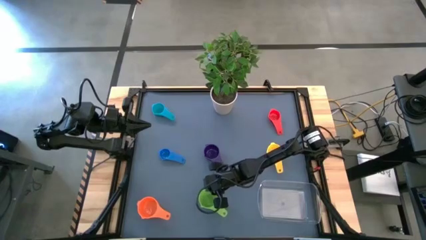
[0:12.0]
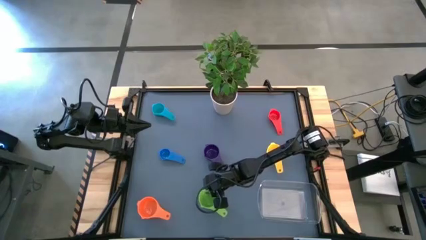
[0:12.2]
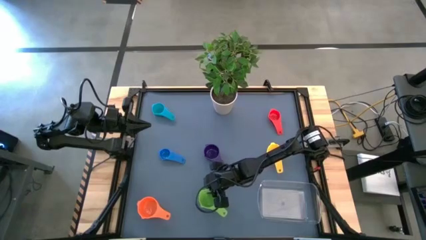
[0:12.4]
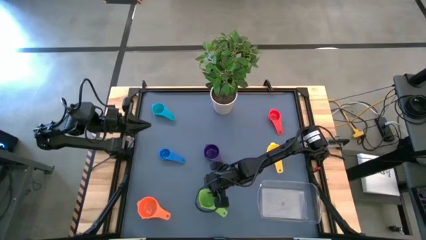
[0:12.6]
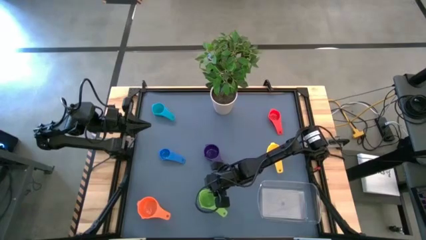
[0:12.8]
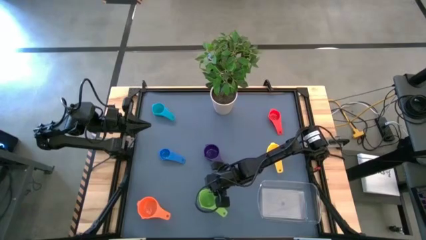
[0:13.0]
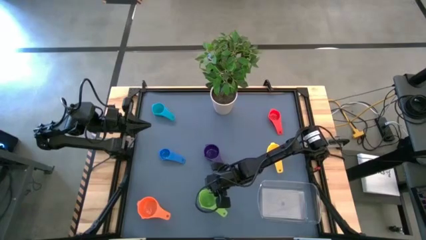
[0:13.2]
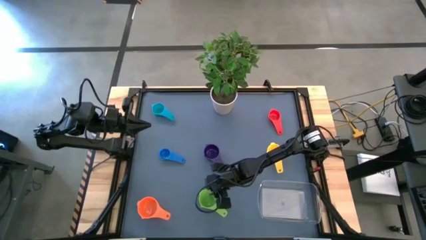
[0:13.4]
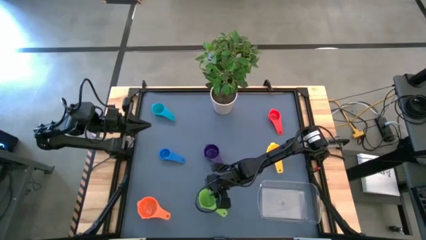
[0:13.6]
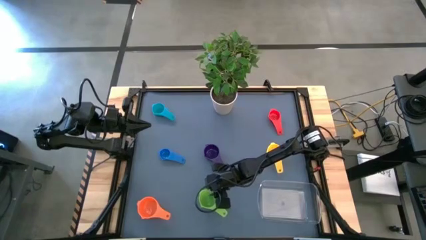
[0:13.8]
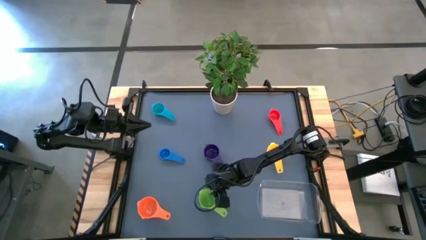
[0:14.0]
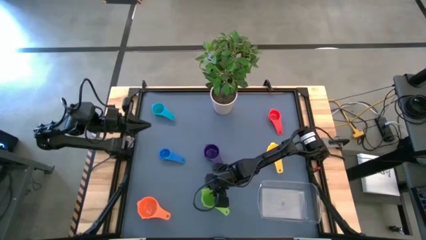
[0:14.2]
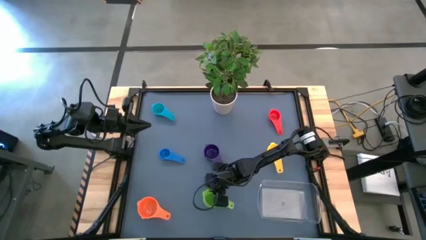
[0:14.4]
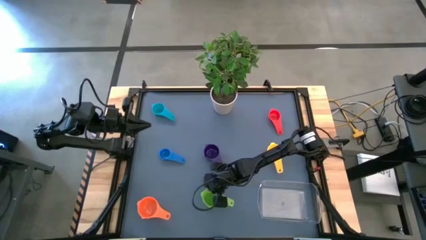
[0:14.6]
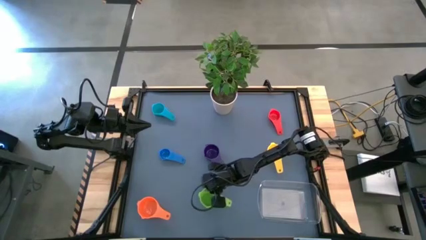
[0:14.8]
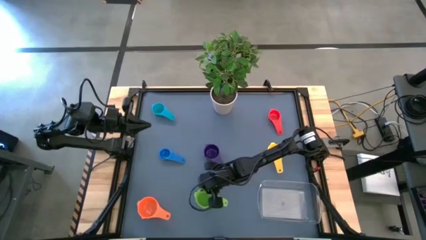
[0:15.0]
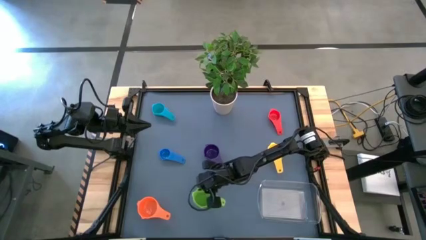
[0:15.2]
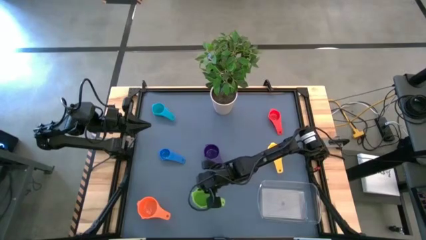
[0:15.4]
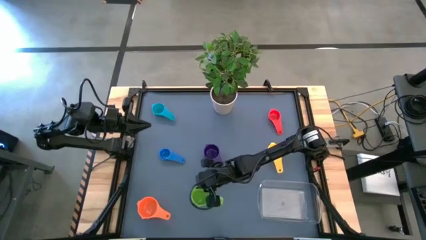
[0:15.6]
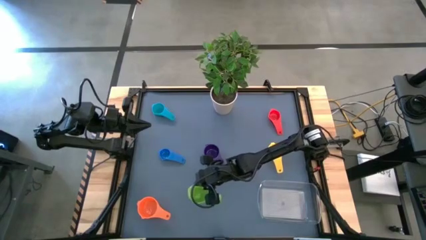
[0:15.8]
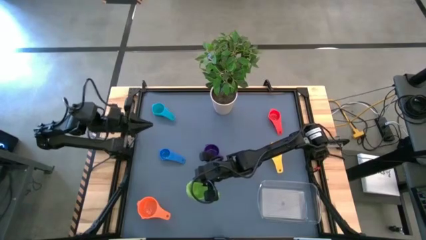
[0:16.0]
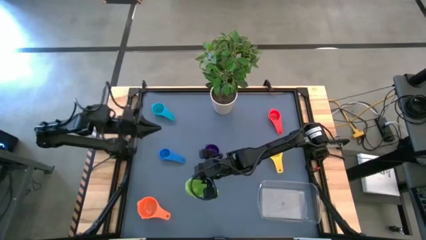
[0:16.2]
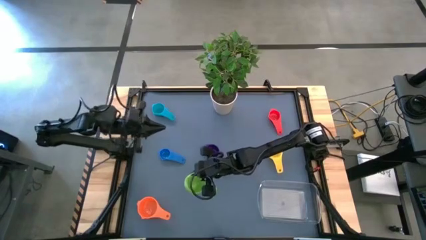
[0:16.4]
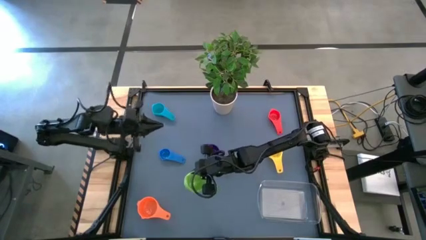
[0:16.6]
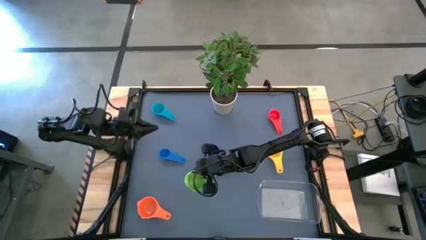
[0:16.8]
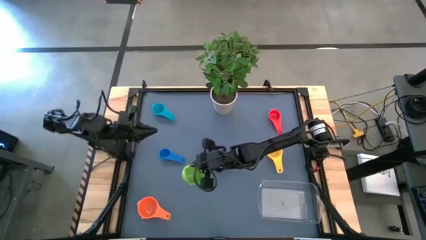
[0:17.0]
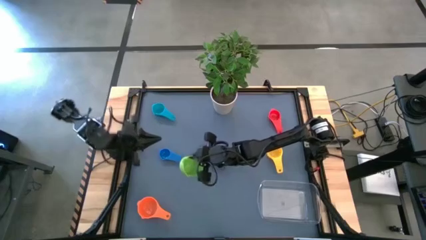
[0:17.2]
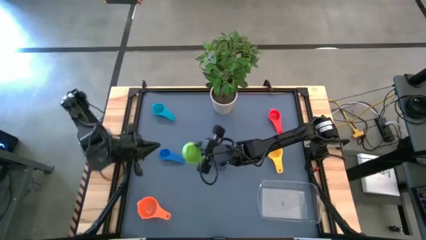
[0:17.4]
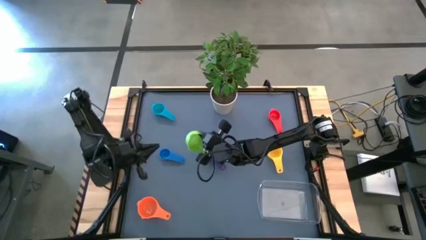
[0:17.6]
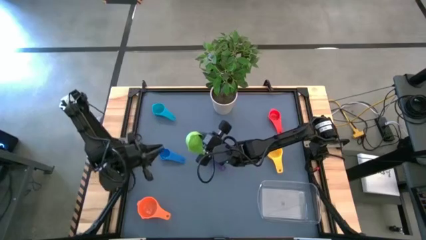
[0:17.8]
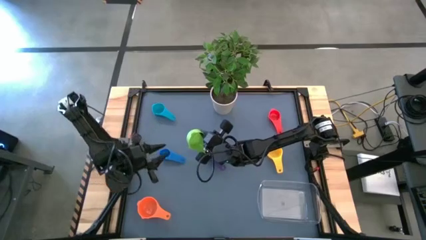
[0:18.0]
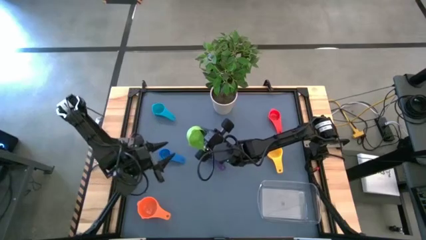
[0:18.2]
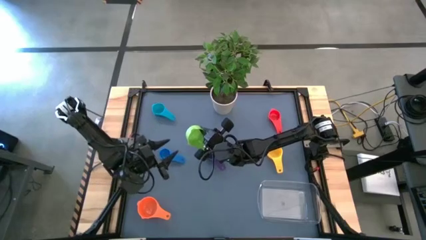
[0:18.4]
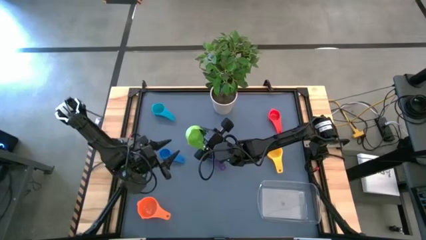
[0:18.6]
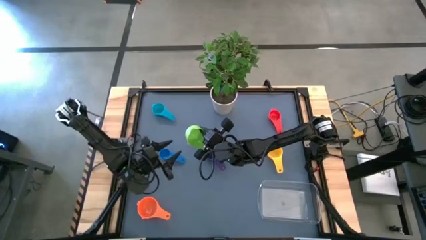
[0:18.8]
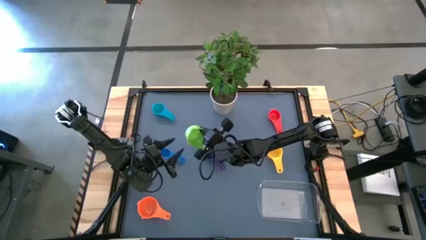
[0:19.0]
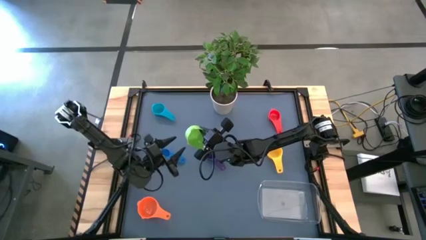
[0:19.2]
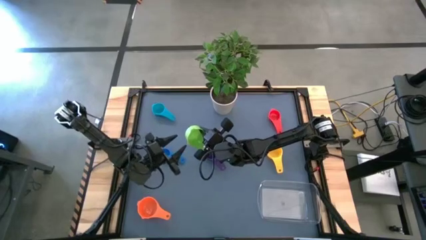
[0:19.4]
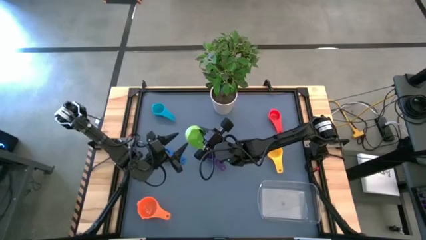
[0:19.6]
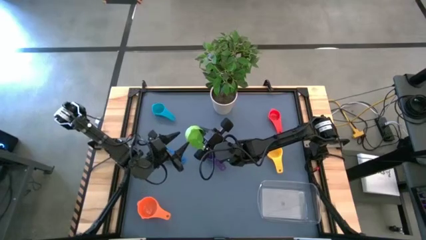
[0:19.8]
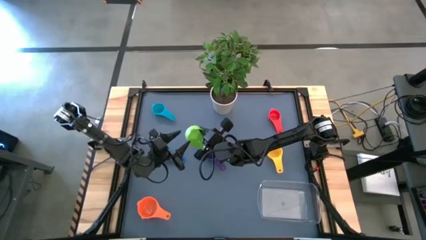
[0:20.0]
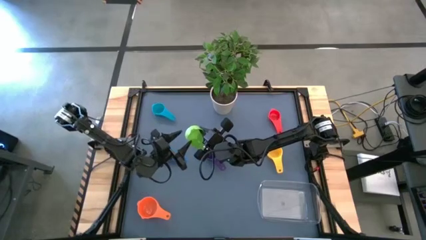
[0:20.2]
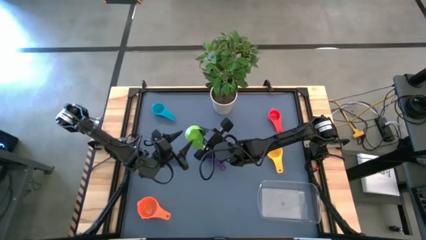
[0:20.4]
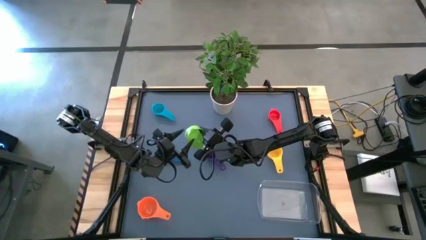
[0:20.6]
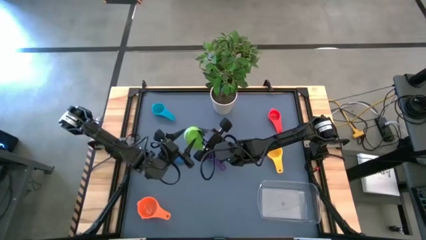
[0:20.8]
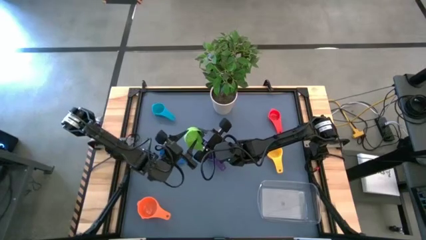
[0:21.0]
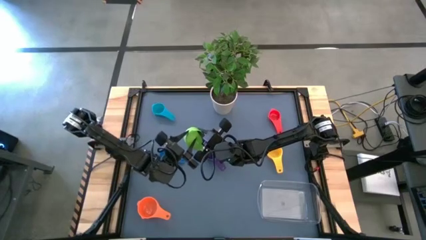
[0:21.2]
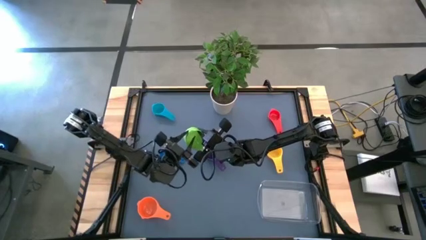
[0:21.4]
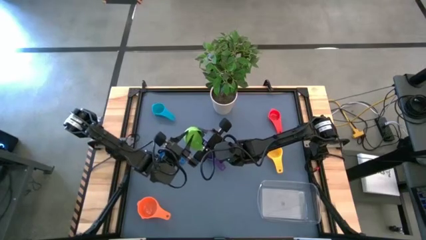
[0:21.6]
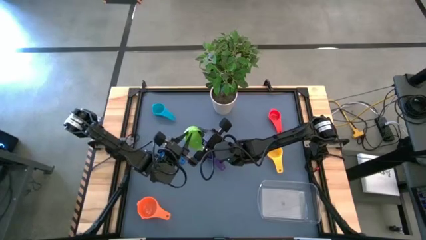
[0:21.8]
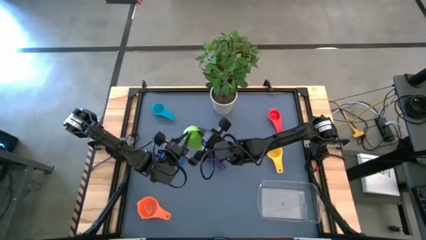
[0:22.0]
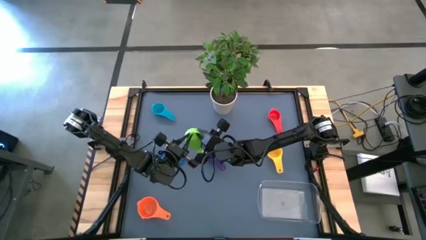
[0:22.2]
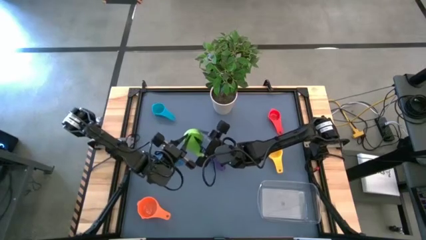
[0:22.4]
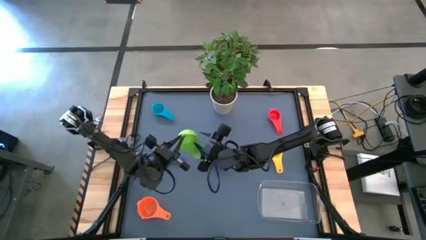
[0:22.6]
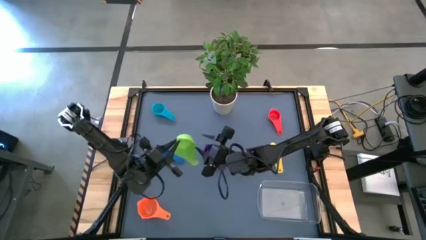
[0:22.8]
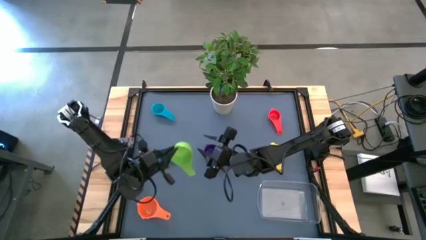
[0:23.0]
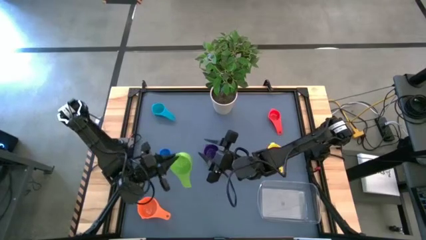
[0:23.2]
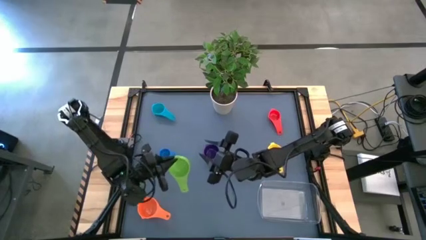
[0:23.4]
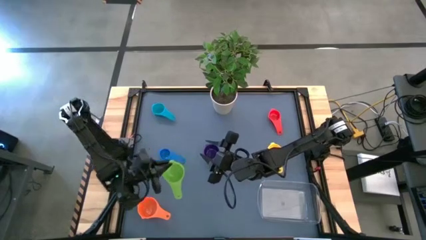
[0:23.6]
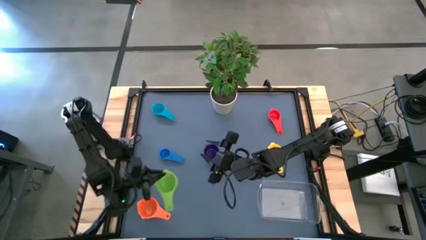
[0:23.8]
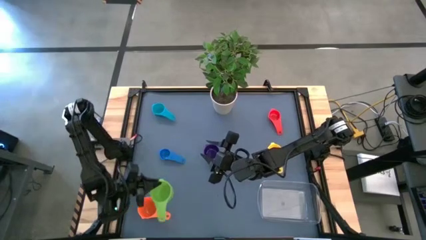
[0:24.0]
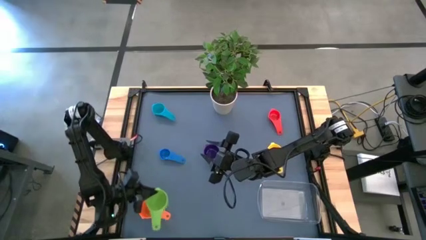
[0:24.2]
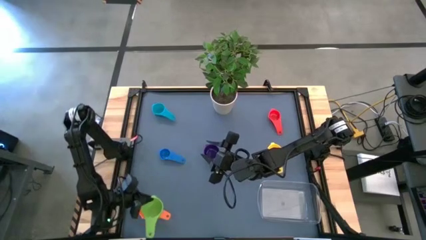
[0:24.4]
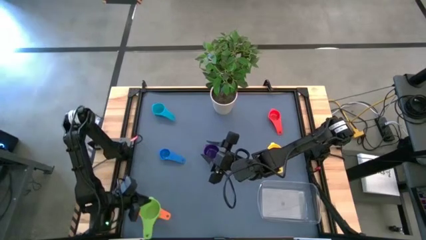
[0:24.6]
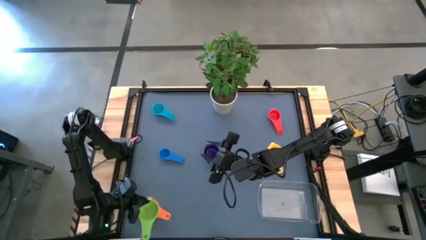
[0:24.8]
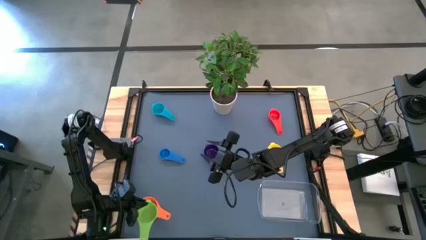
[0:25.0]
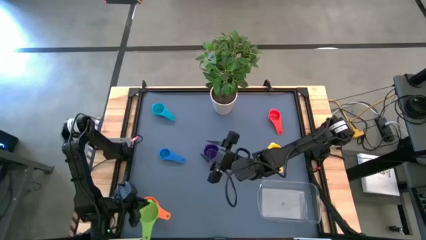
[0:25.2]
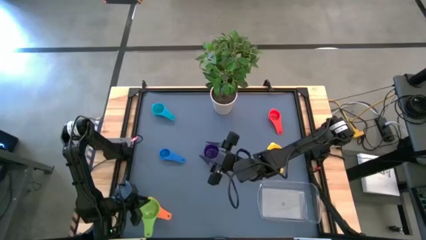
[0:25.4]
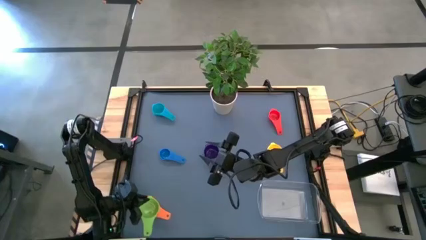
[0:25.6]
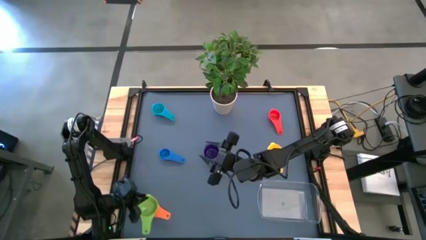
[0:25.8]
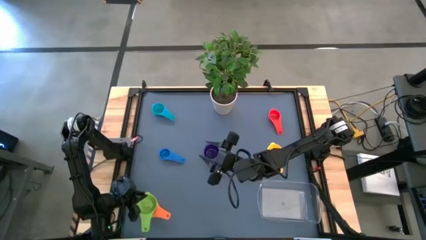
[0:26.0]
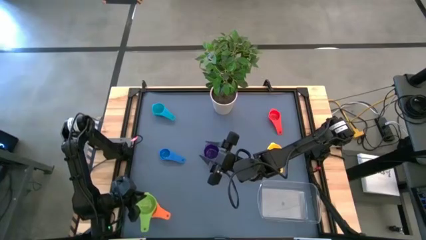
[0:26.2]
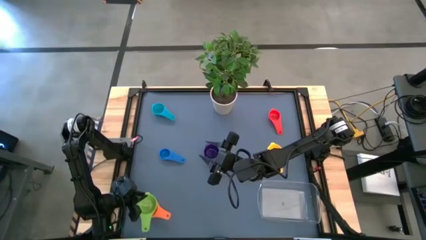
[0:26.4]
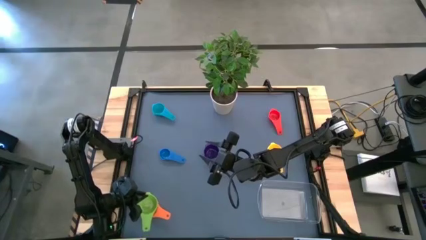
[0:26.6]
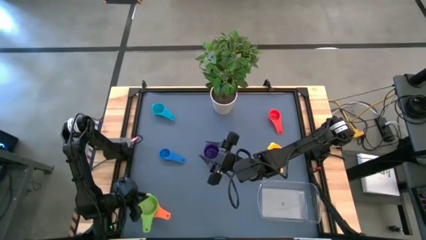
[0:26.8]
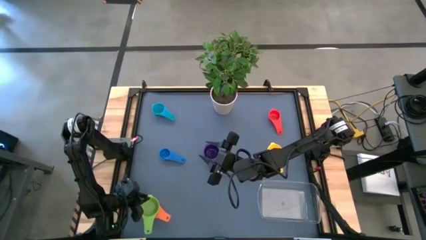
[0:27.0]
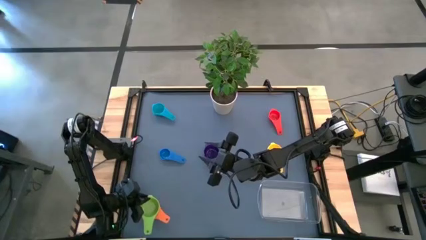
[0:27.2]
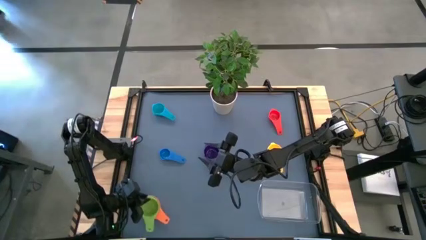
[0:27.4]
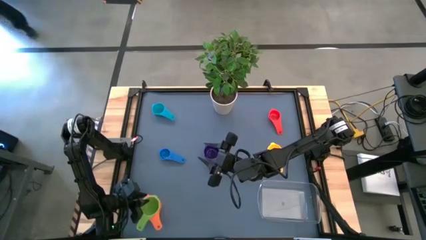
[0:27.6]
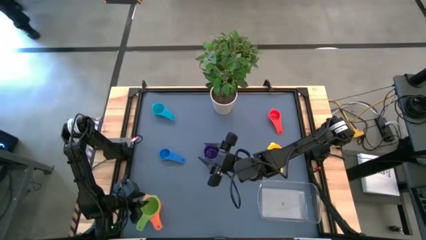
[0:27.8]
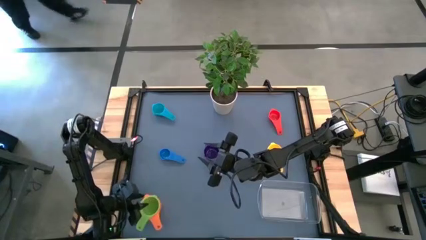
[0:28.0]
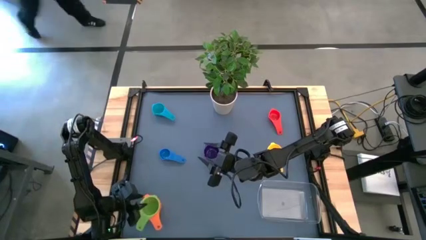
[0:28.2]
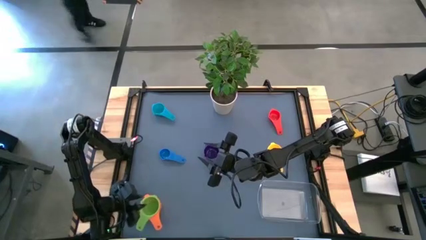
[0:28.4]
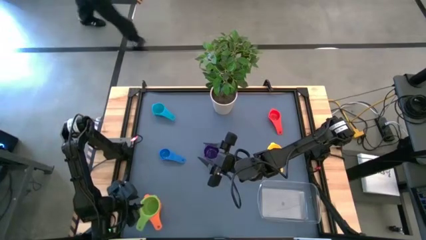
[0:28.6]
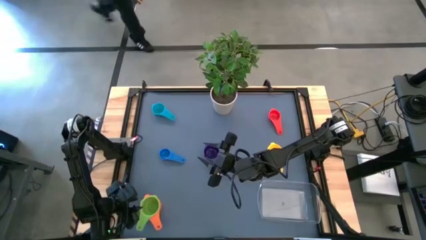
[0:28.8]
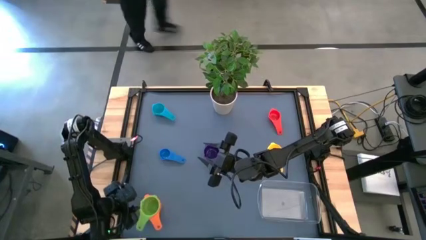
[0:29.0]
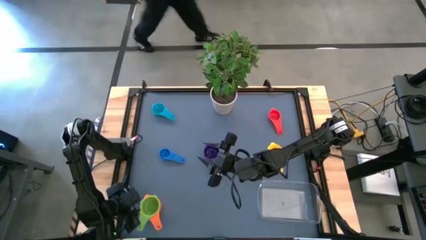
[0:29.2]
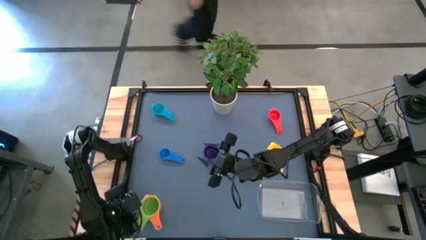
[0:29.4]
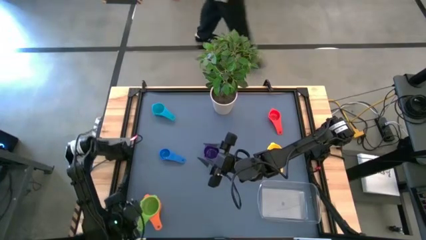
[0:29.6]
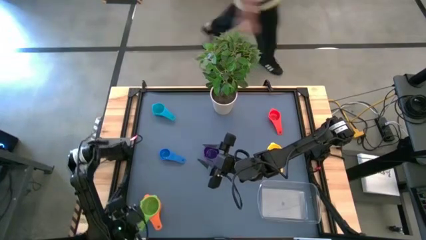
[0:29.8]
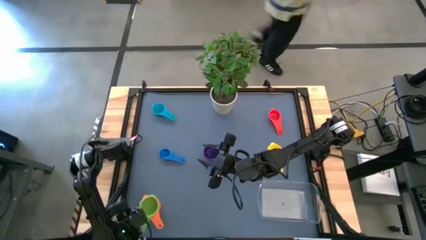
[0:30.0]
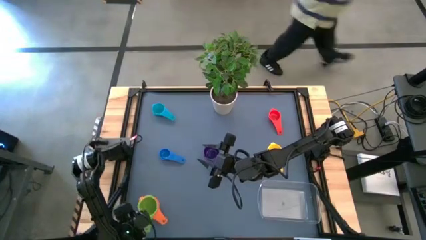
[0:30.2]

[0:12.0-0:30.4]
Task: Nest measuring cups in basket
Stack the green measuring cup on top of the orange measuring cup
